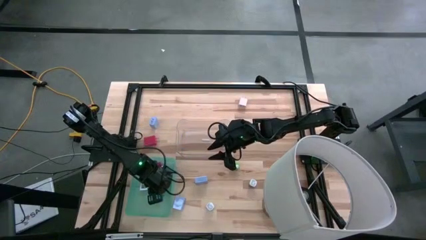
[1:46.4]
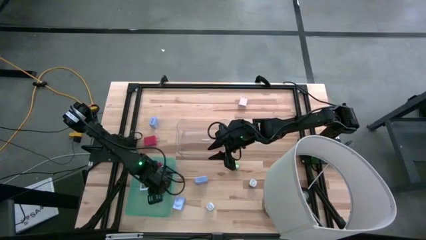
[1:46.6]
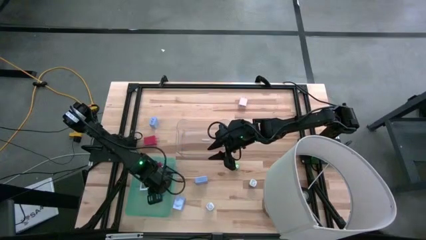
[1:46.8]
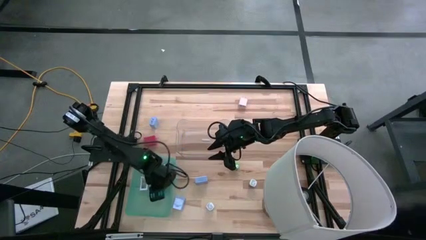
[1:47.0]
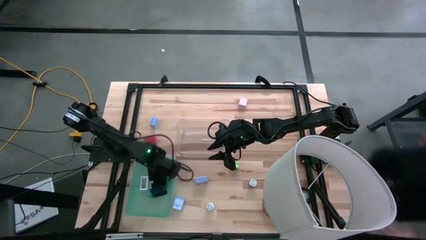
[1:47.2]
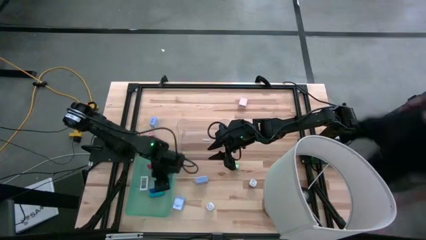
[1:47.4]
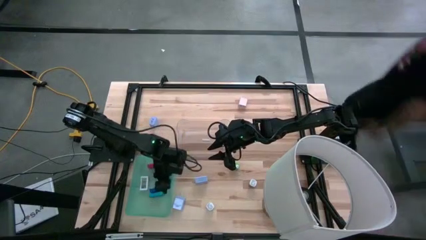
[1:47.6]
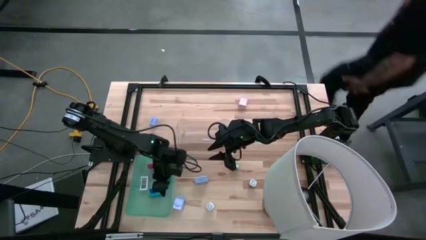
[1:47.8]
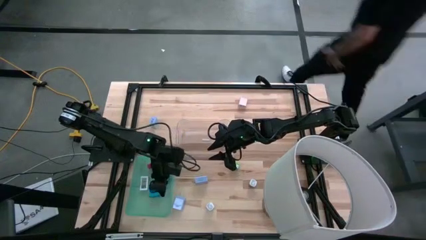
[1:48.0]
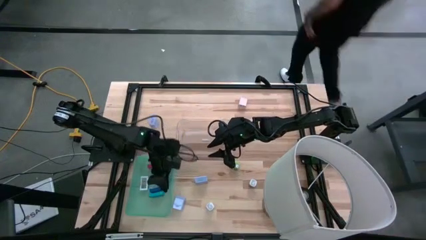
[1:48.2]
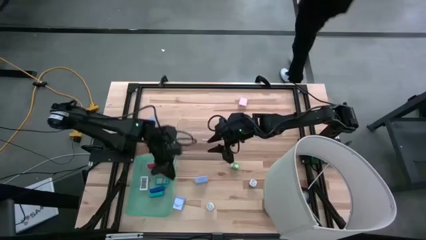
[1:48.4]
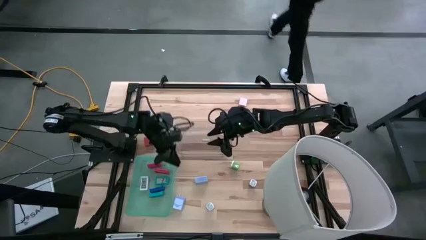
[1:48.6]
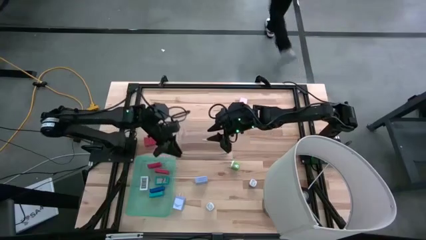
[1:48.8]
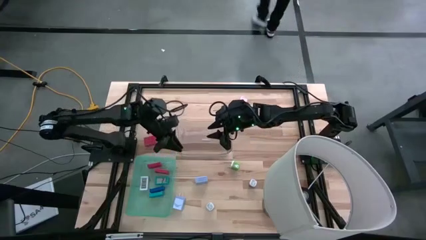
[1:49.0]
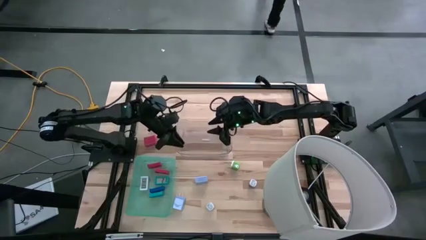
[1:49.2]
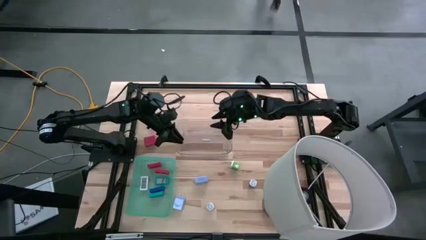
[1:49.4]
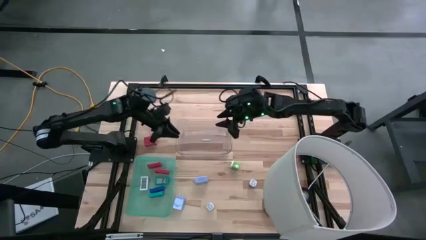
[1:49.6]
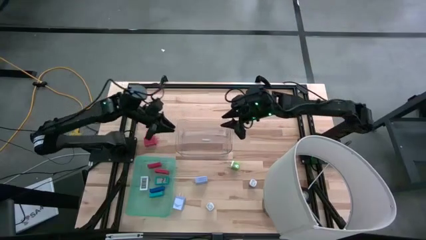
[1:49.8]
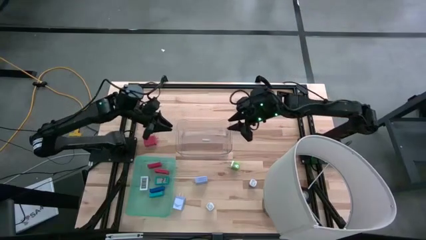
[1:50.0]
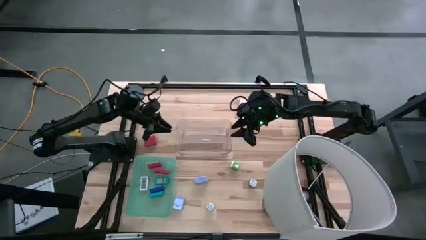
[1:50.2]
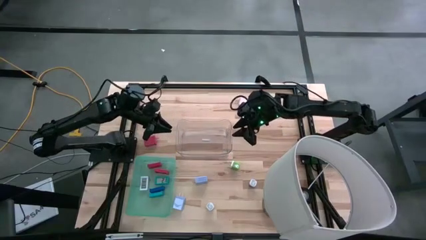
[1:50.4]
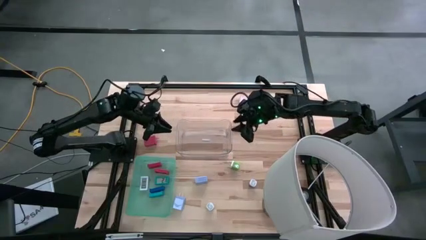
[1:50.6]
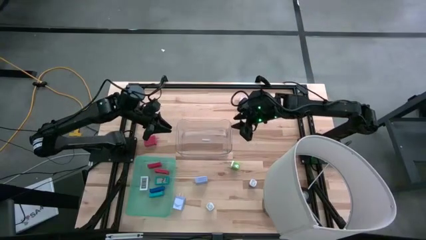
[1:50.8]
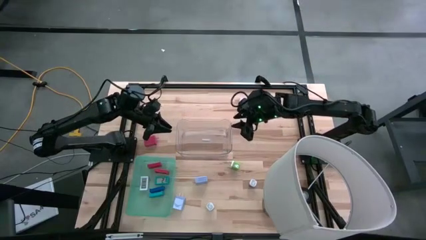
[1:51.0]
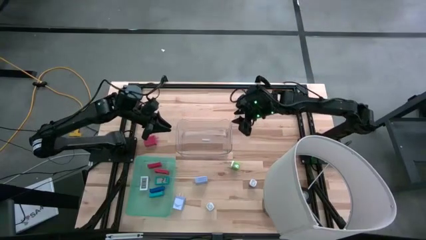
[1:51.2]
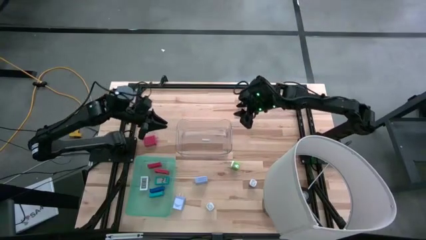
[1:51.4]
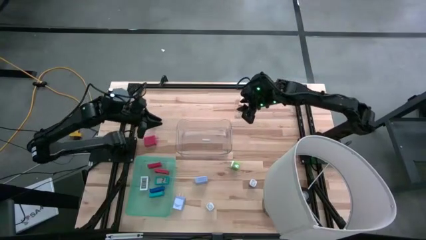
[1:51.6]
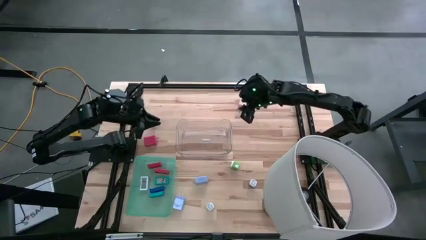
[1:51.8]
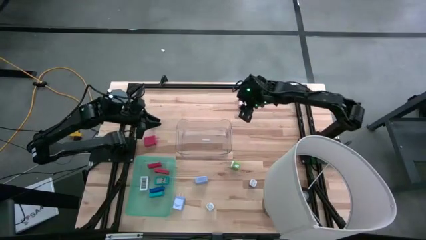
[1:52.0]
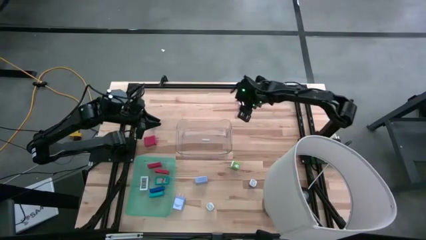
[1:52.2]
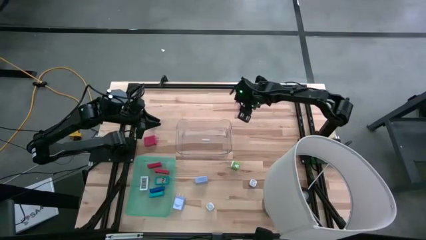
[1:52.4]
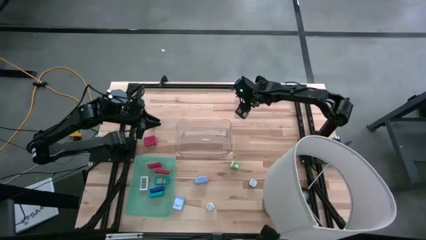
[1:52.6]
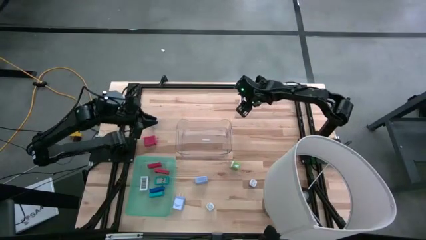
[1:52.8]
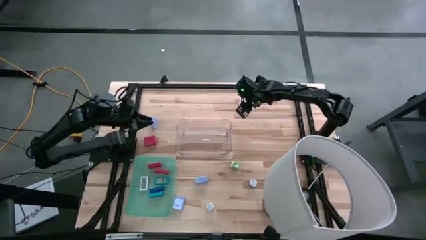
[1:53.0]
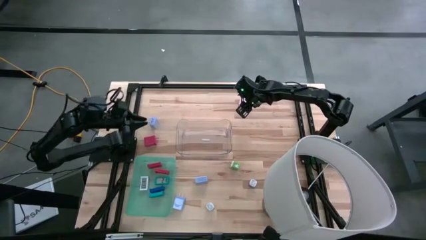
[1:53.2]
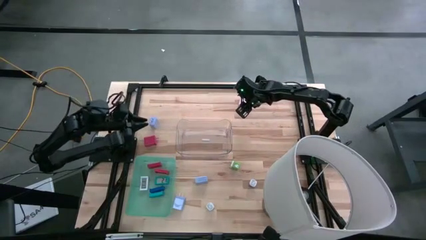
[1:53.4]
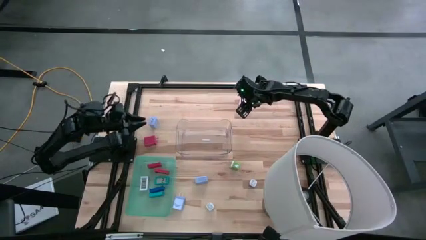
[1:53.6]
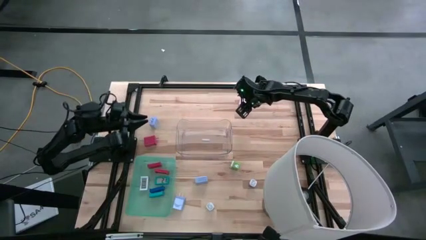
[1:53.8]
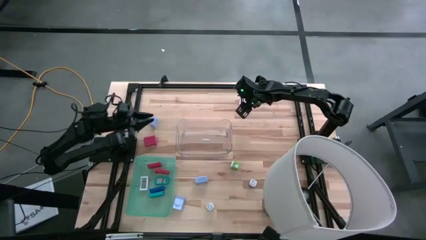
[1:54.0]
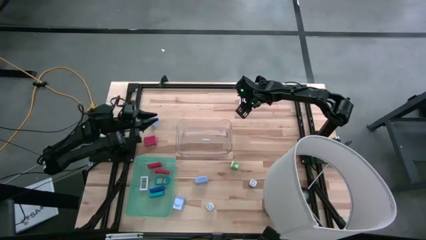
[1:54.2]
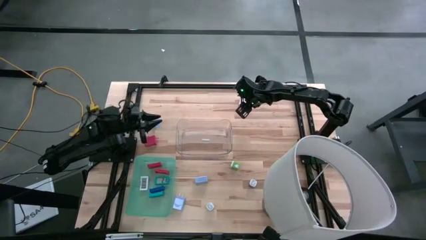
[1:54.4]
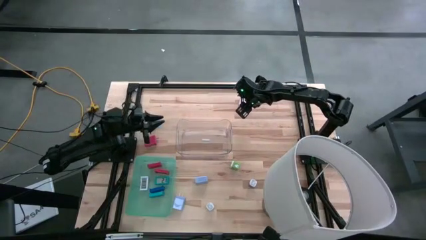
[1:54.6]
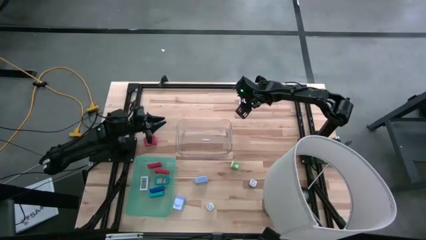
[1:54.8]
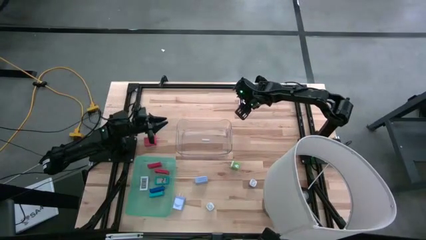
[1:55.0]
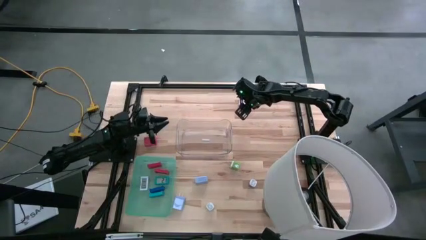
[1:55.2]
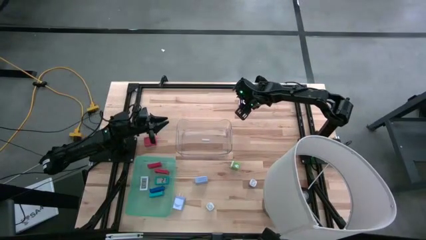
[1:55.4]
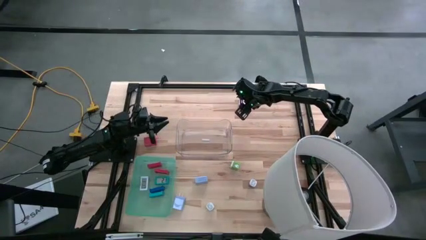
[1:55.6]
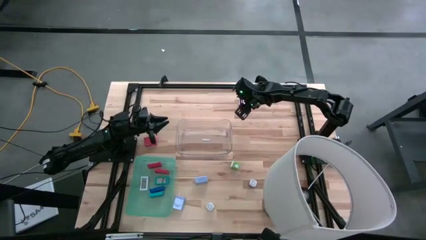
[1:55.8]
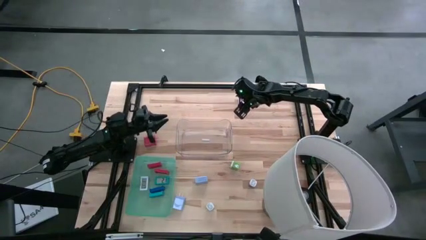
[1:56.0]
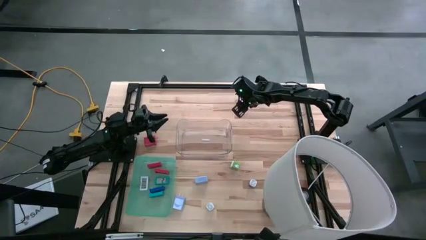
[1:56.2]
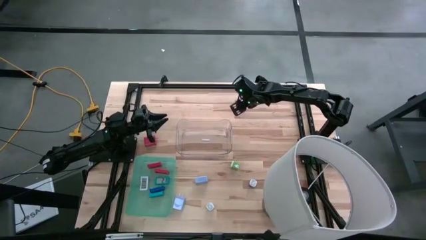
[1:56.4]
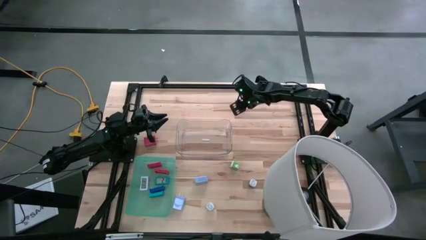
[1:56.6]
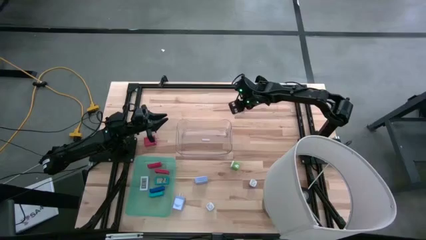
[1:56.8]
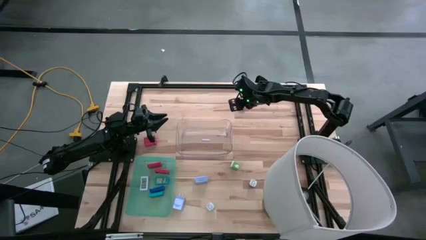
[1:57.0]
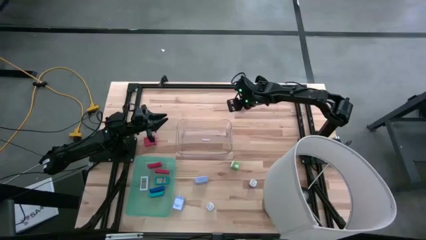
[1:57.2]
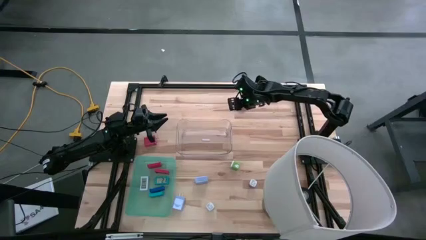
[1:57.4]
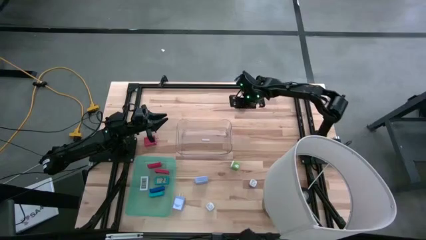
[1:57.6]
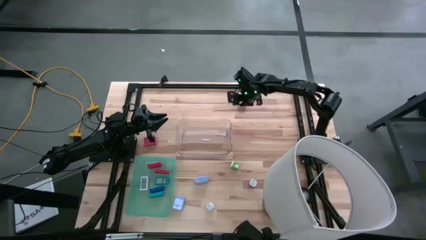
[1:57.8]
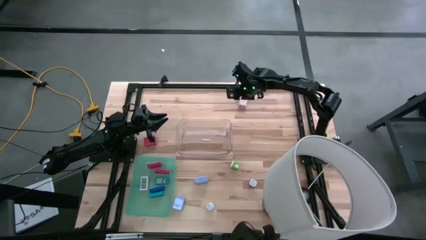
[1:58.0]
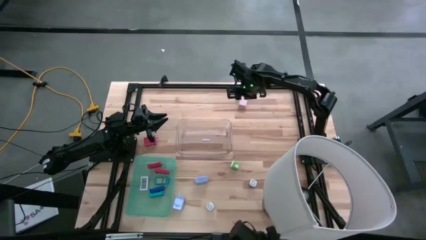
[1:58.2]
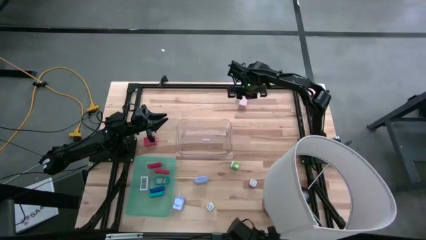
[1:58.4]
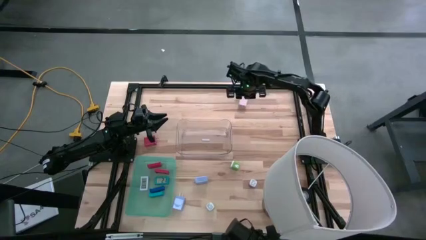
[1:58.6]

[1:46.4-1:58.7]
Task: Pick & Place Office items
Put the pink charger adapter into transparent bin

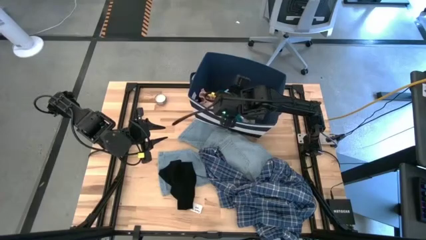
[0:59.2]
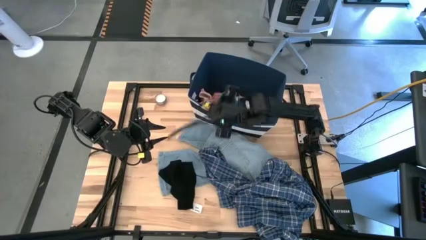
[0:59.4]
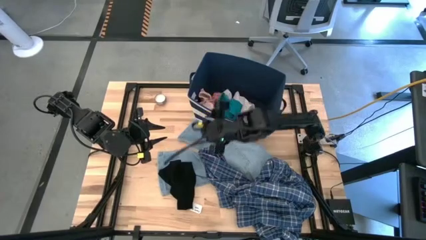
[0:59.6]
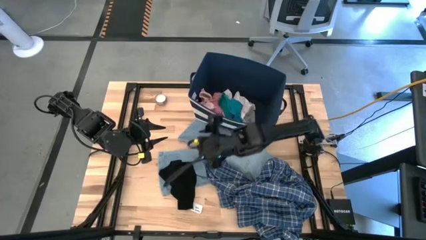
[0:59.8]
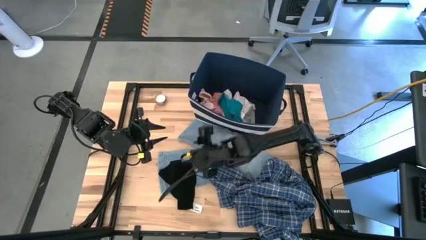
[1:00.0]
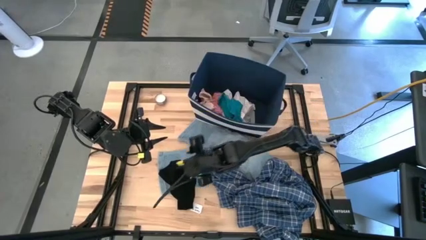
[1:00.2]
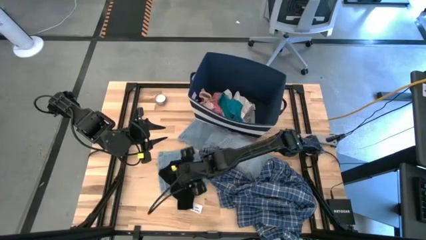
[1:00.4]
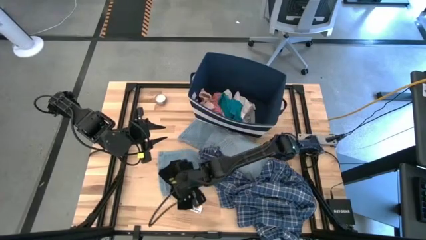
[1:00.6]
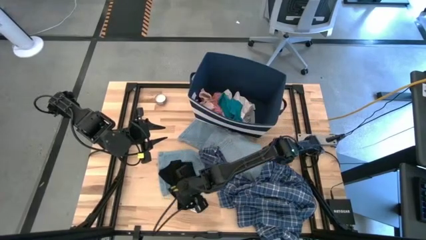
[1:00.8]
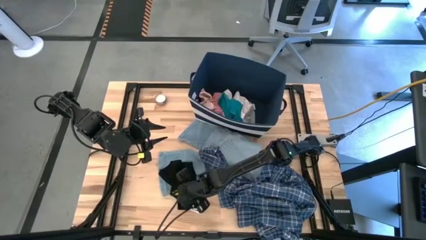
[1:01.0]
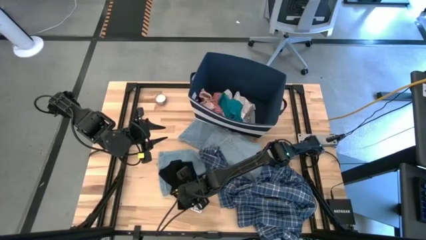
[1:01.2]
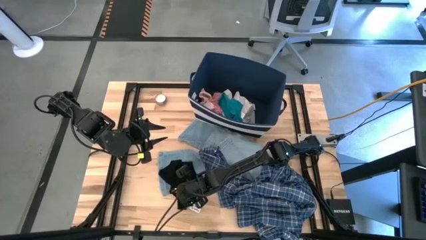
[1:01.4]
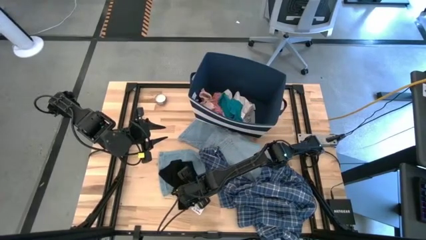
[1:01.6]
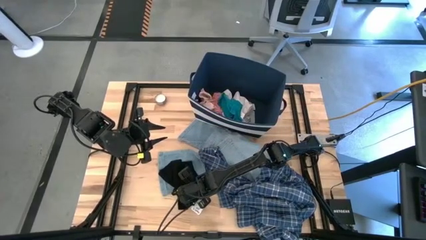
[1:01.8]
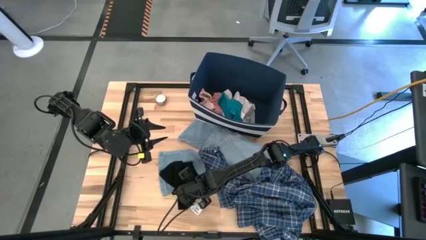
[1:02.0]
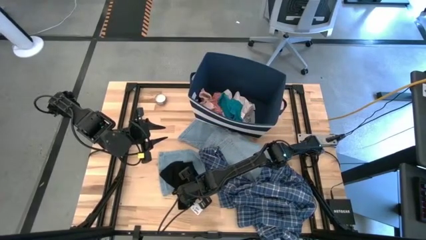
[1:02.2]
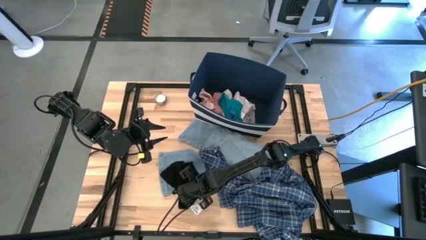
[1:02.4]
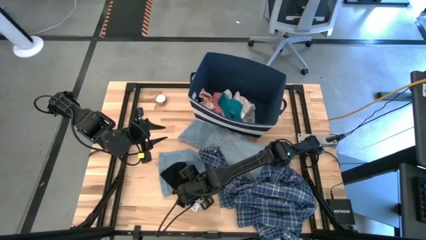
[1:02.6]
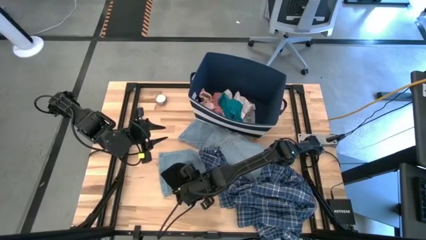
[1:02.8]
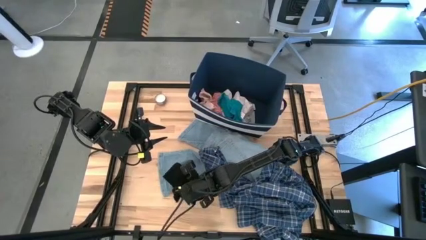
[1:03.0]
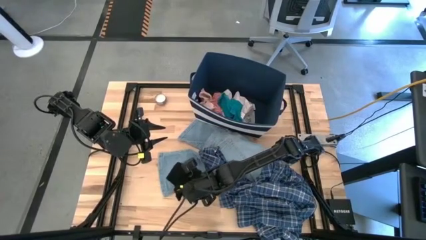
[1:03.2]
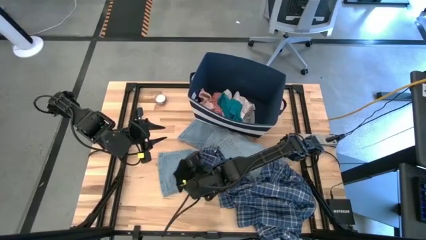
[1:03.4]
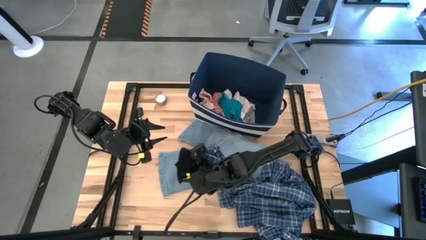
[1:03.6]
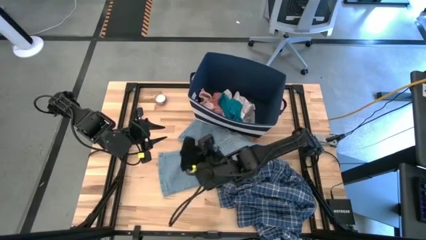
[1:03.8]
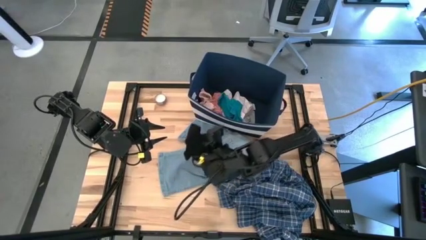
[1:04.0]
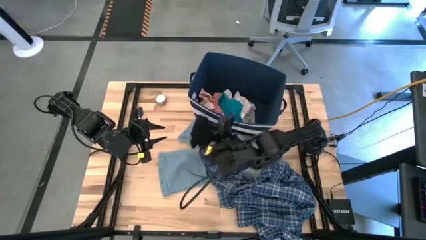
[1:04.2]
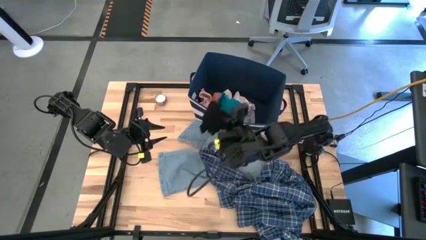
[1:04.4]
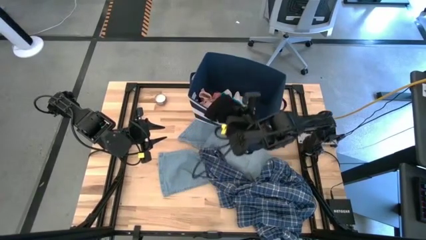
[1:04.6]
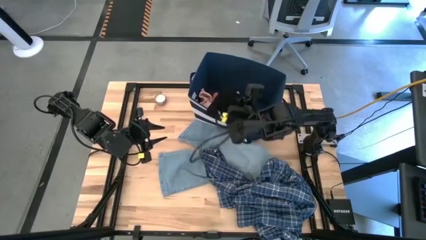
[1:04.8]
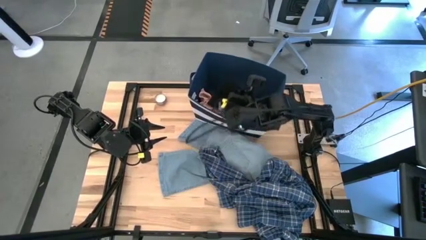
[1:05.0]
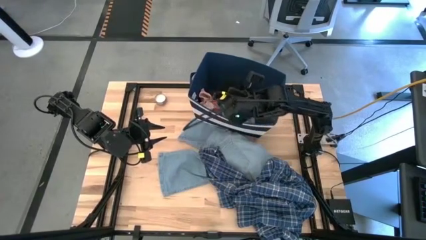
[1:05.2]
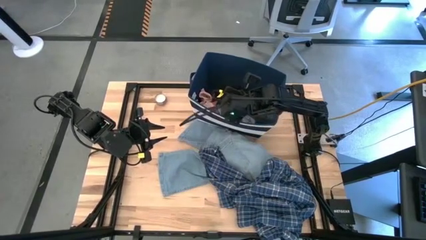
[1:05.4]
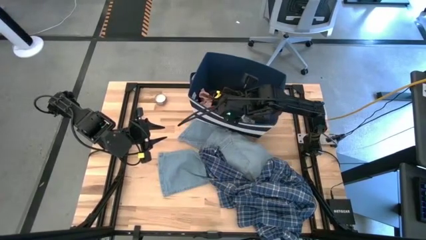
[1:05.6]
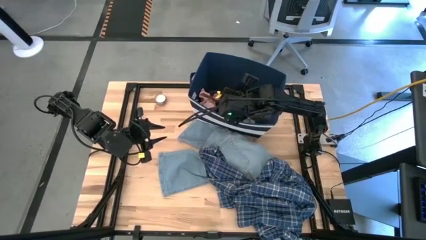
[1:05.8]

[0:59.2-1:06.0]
Task: Sort clothes
Put the black shorts into the blue laundry organizer
